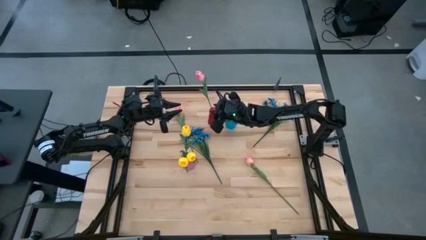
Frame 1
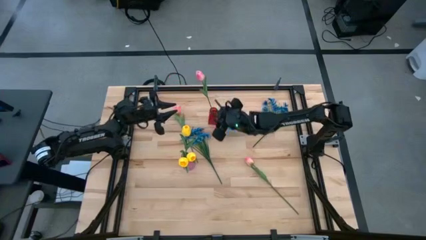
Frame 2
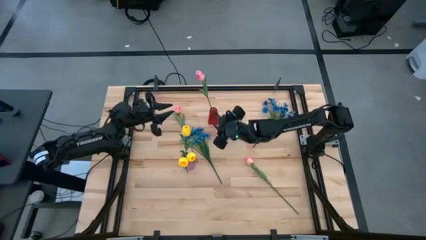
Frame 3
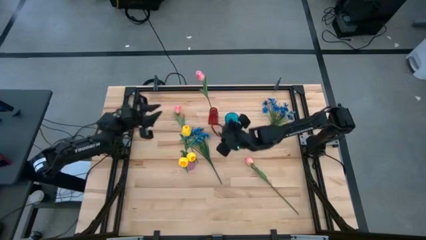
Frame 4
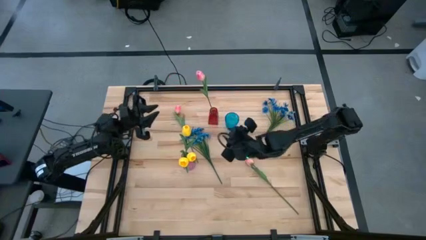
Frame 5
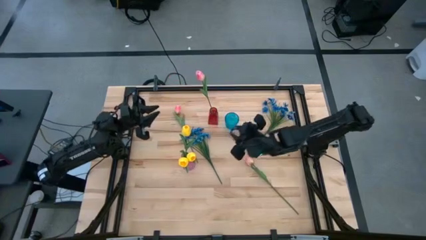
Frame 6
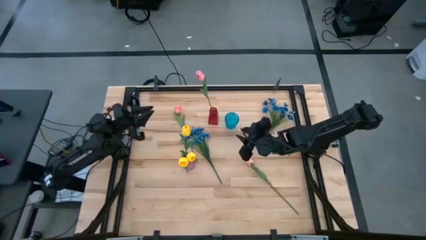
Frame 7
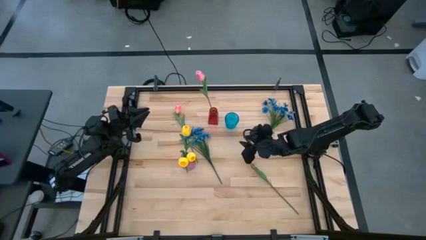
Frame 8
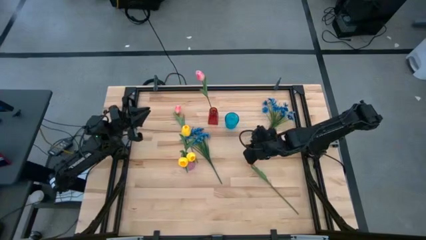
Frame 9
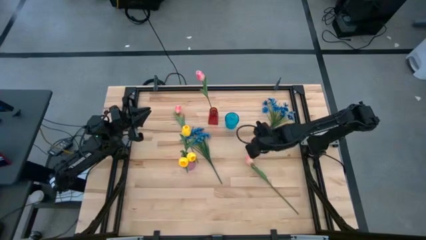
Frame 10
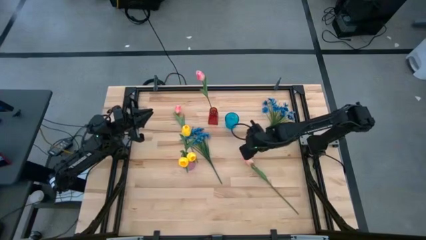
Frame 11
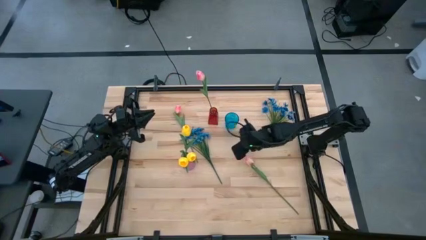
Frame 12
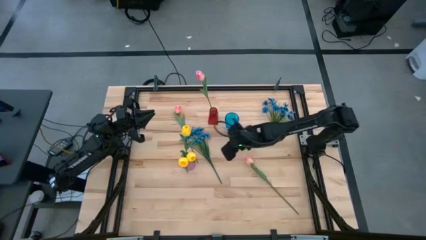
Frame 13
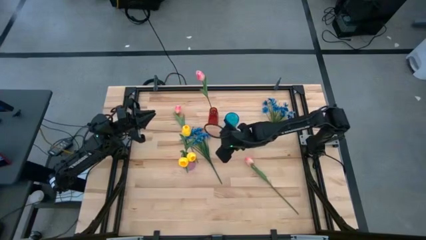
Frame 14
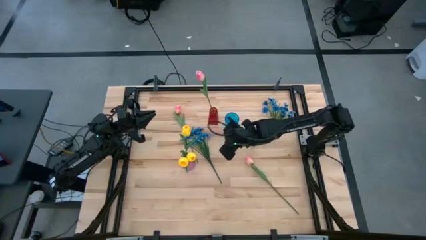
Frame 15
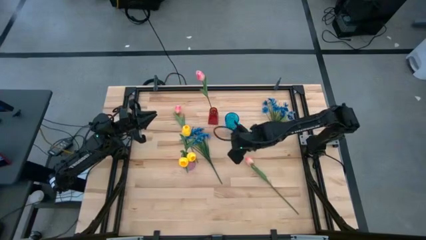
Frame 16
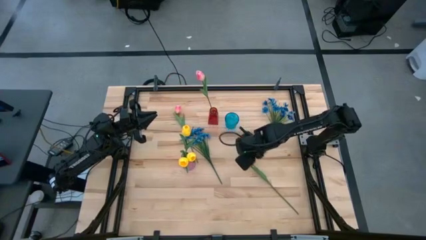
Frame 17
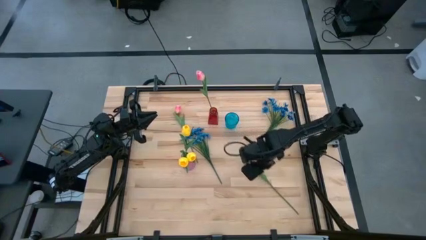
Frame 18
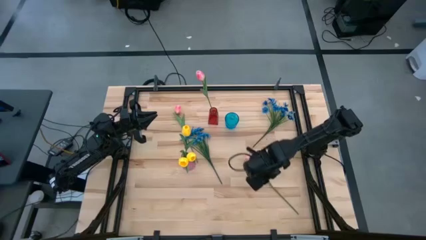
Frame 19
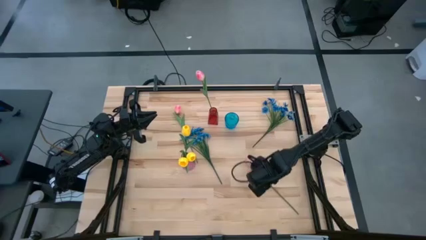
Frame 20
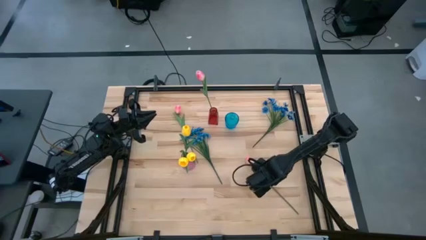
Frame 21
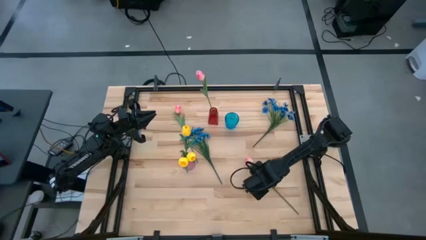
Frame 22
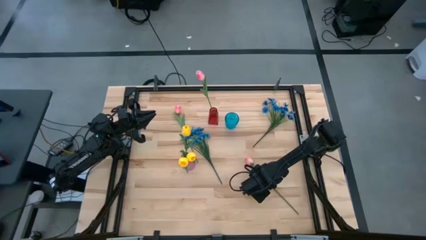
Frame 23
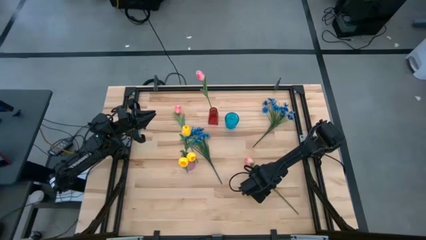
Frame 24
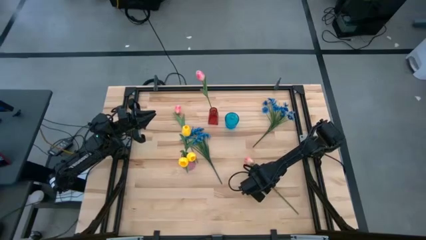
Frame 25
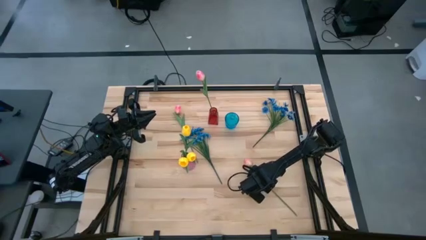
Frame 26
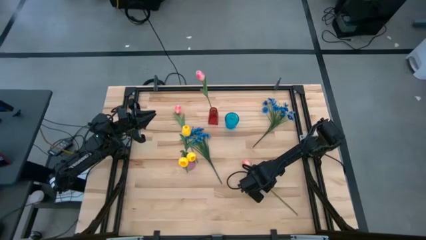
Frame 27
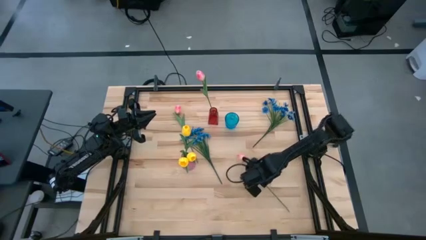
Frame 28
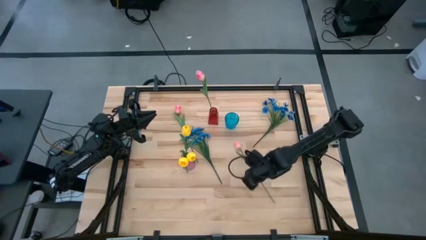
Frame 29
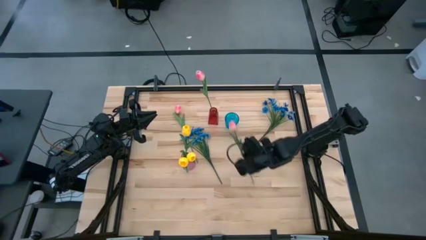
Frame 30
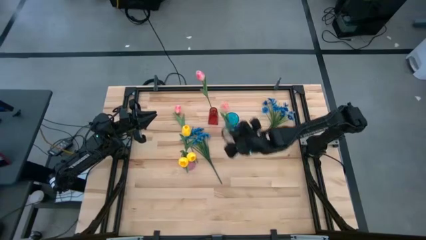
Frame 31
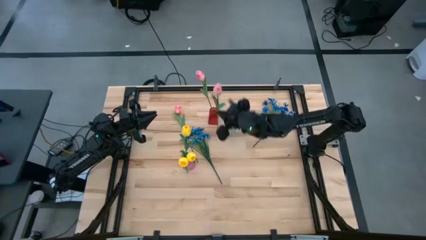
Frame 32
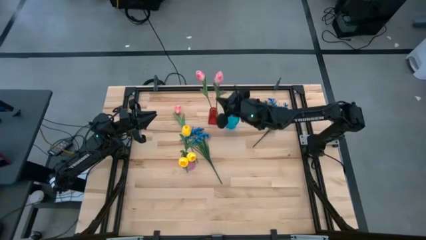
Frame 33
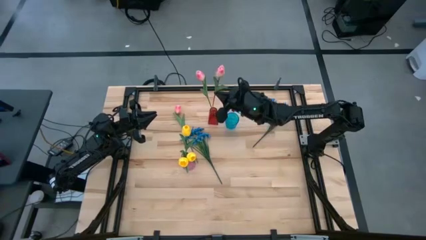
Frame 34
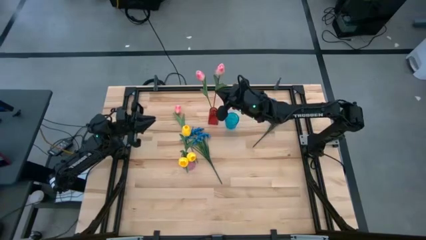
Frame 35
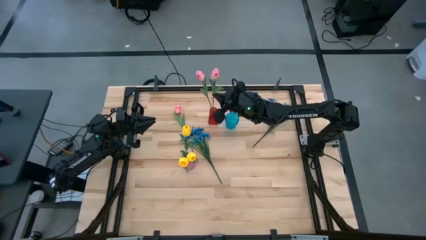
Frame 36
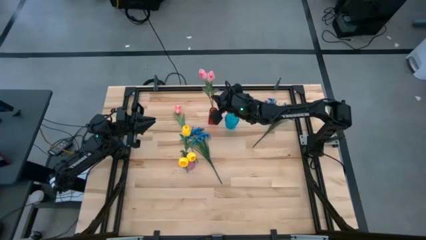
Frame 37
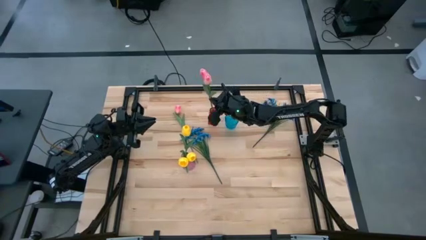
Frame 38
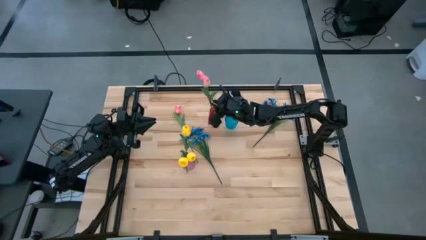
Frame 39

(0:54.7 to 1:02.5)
Task: Sort flowers into vase by color
Put the bottom pink flower into the red vase

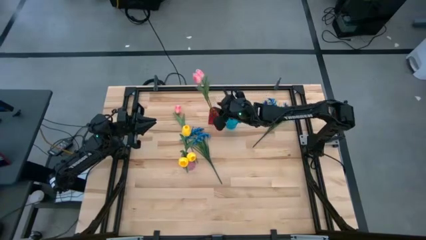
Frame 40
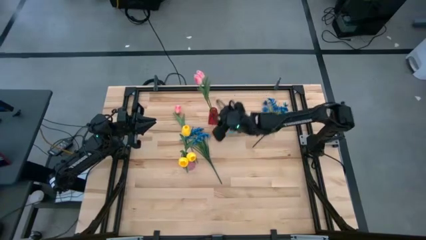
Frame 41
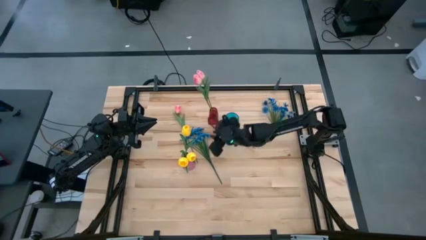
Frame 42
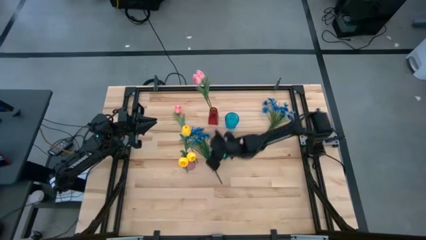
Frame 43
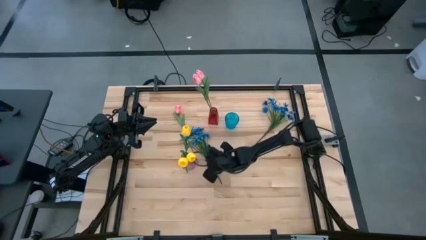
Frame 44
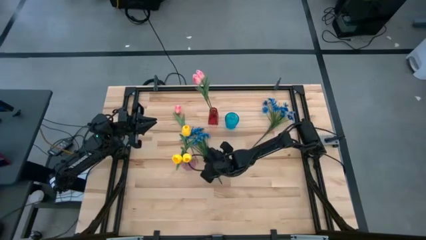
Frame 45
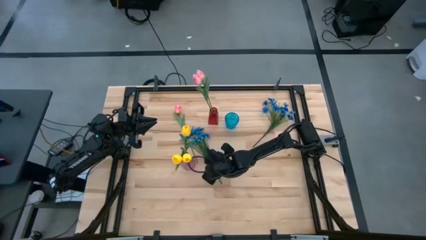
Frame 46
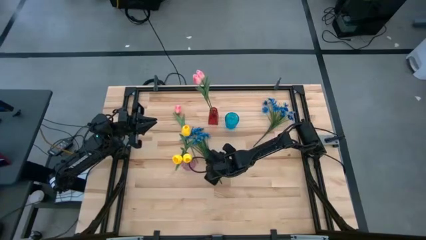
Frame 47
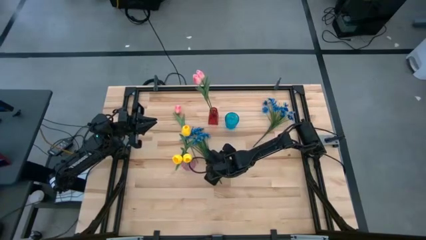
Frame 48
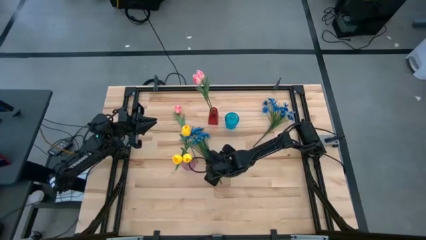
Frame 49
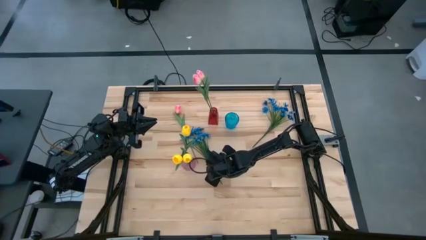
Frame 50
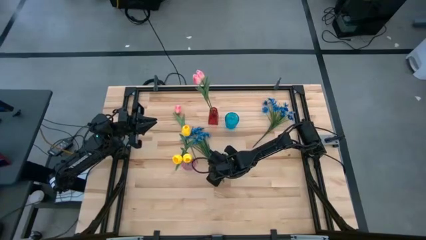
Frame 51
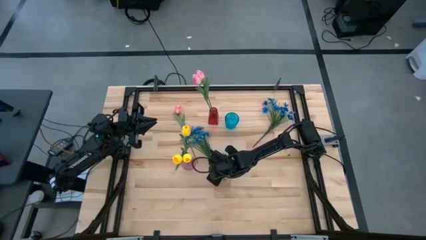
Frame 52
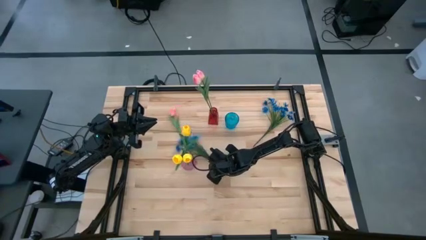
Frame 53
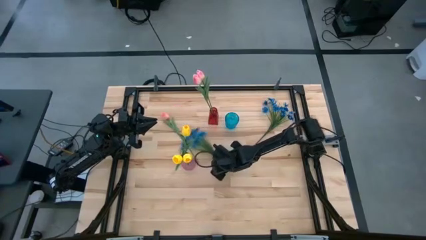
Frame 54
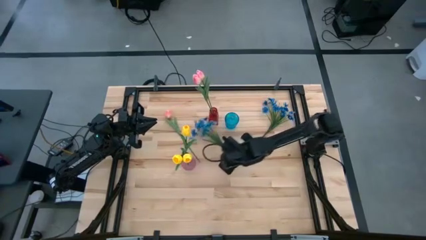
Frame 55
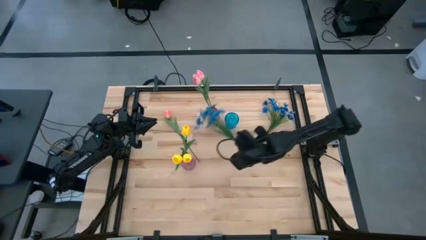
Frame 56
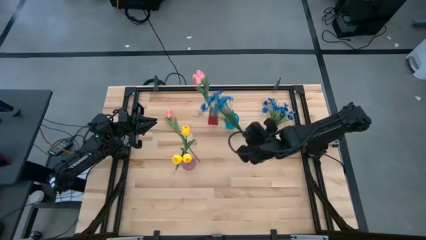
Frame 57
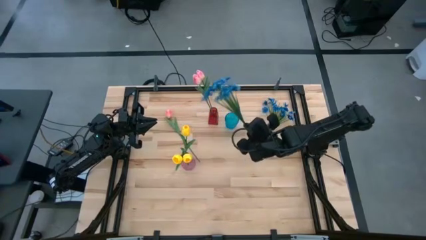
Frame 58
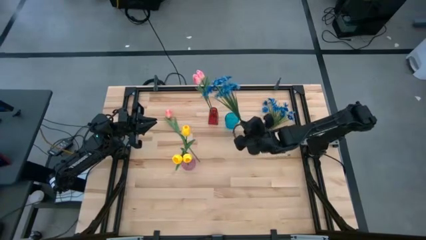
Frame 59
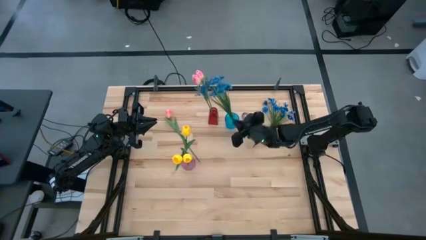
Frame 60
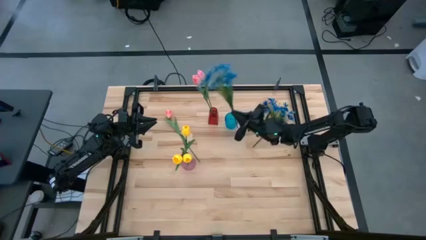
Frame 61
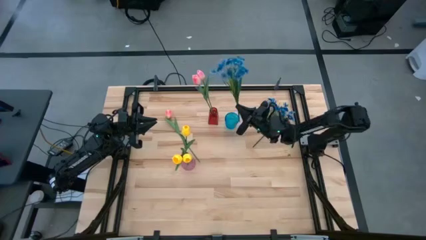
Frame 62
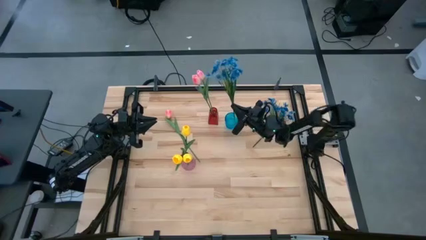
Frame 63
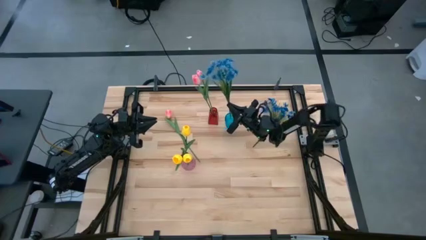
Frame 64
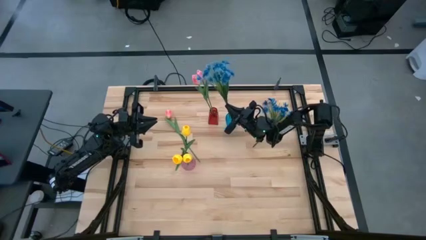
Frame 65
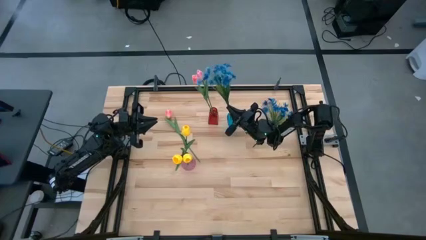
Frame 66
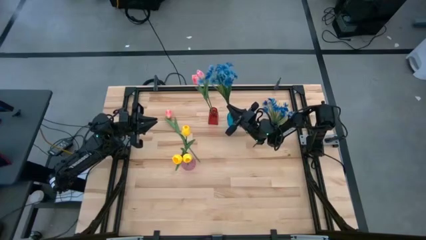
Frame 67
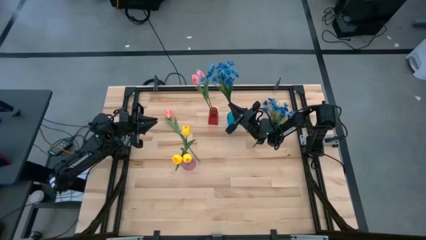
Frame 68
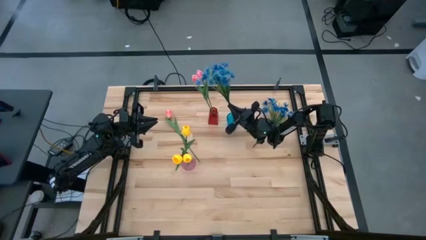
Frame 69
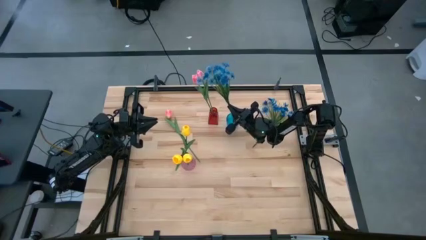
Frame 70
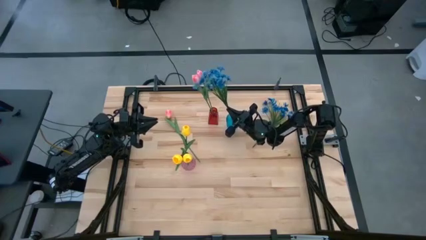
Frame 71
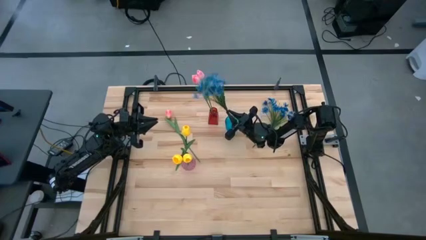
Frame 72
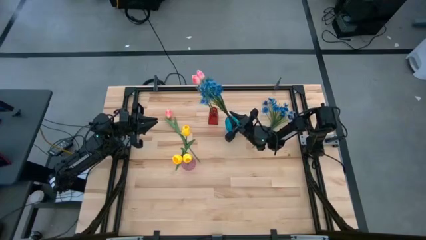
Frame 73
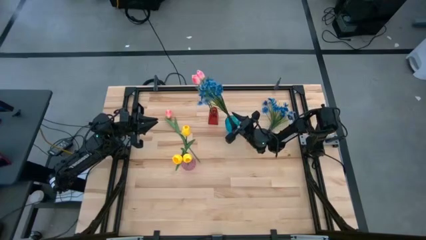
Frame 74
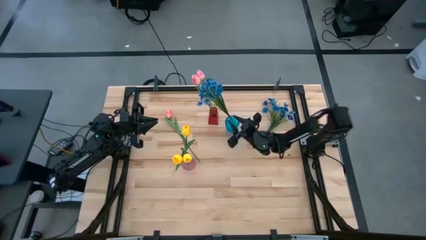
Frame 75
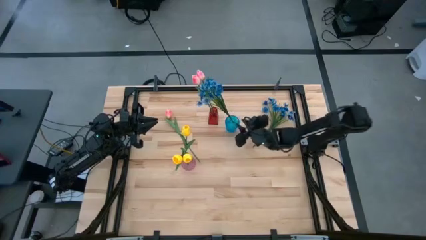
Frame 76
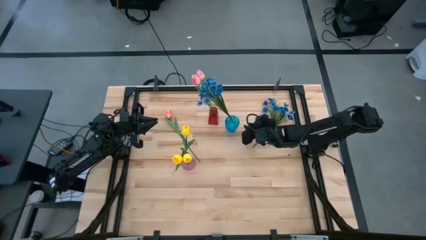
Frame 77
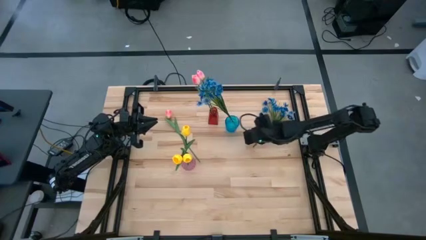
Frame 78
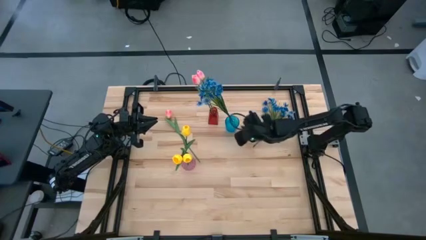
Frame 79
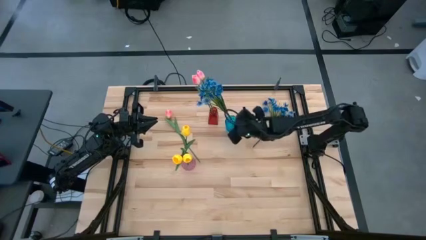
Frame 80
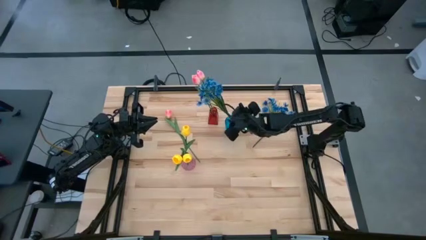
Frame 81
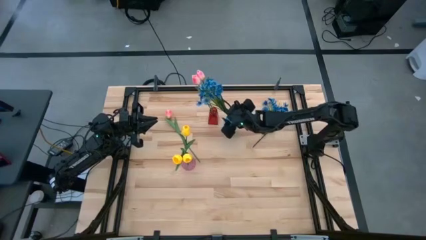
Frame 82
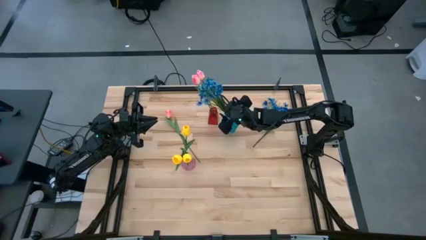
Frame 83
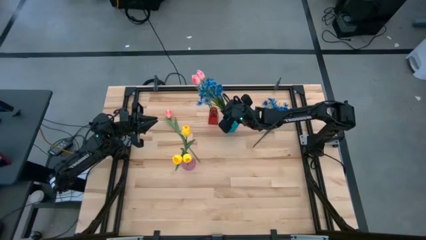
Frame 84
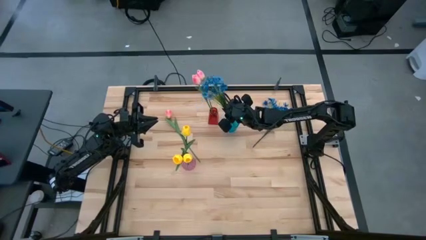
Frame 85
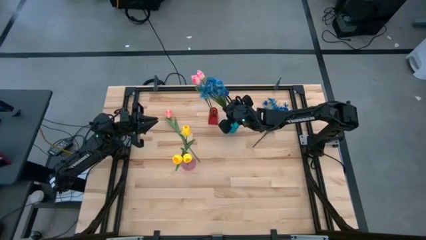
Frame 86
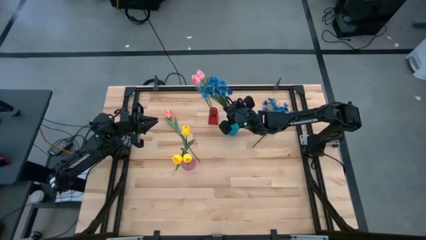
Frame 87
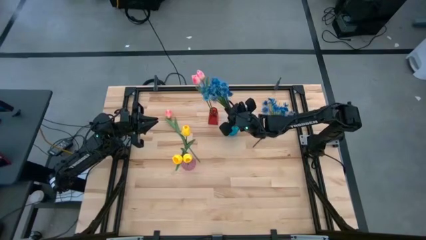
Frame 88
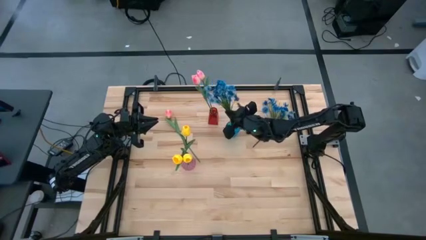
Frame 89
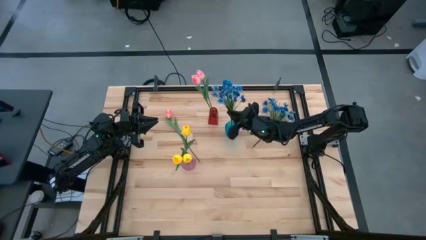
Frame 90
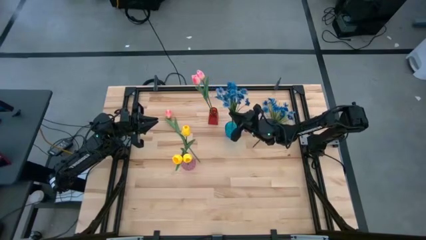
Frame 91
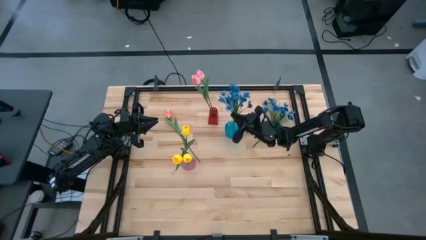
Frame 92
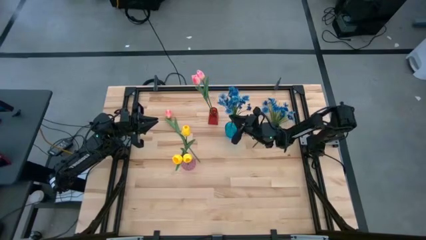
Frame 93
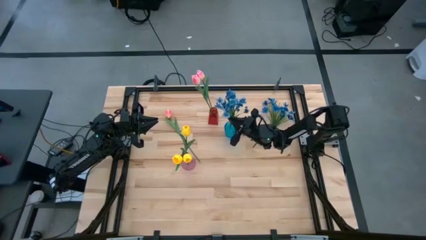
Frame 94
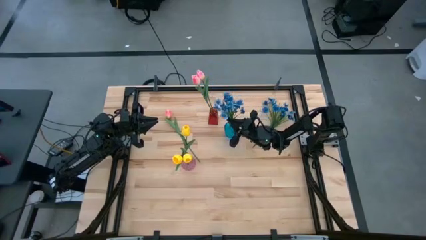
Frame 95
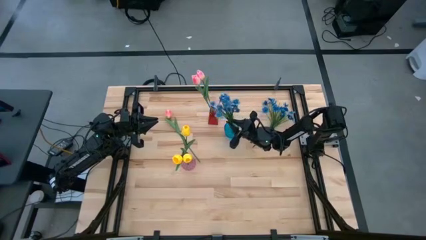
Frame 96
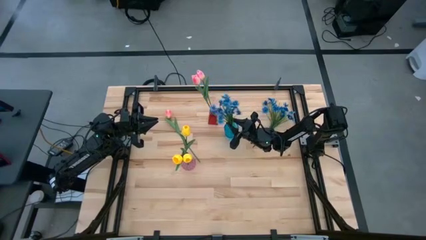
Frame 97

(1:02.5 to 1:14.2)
Put the left blue flowers into the blue vase
